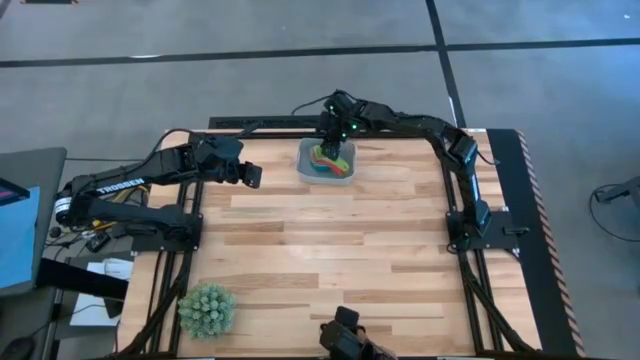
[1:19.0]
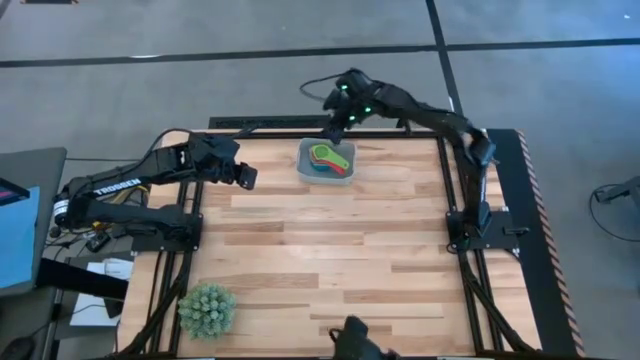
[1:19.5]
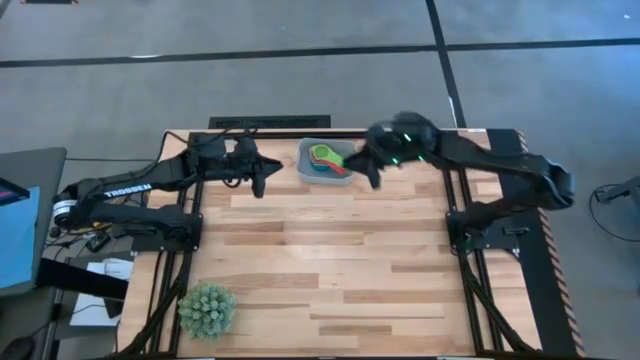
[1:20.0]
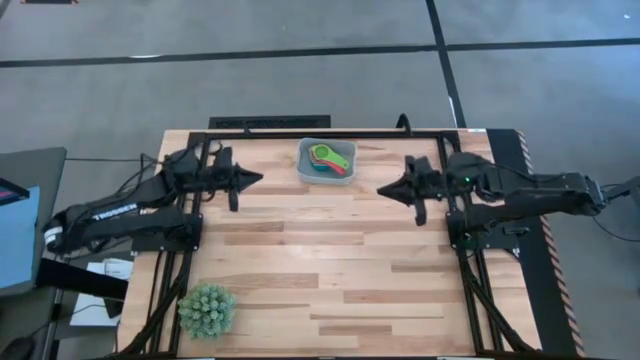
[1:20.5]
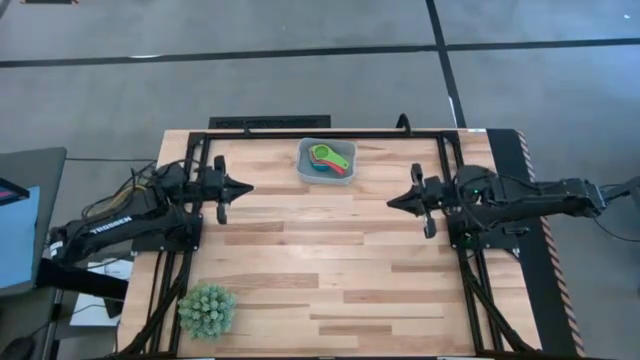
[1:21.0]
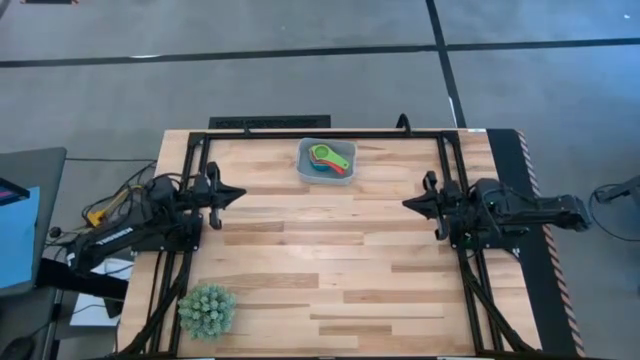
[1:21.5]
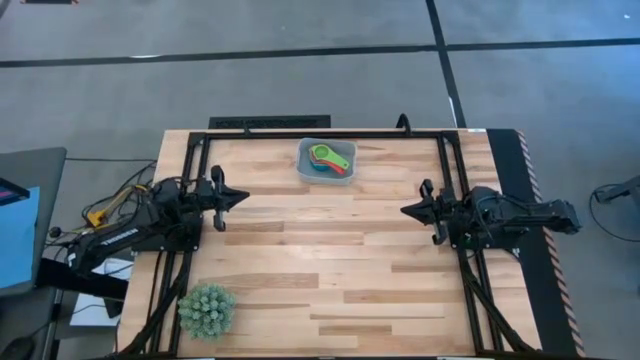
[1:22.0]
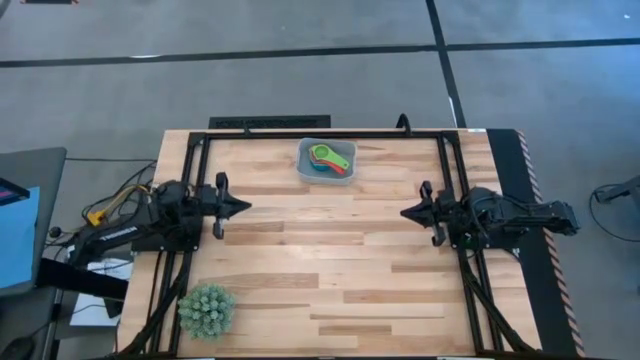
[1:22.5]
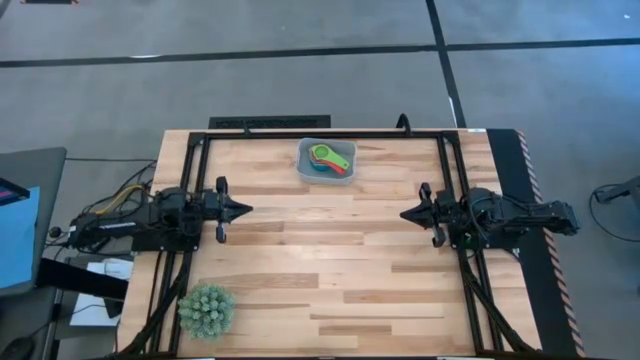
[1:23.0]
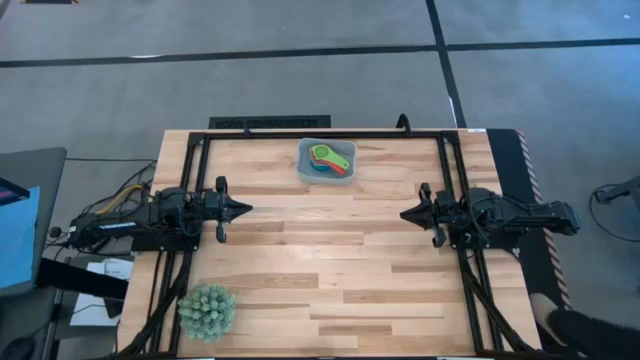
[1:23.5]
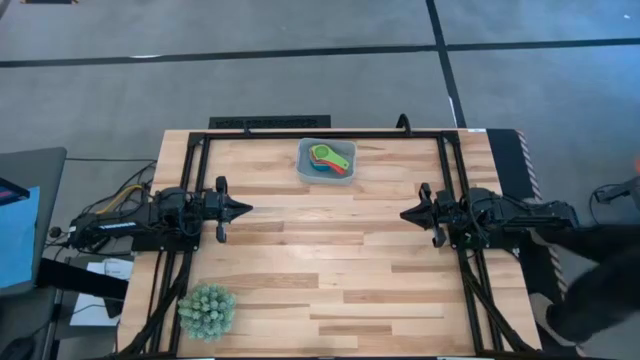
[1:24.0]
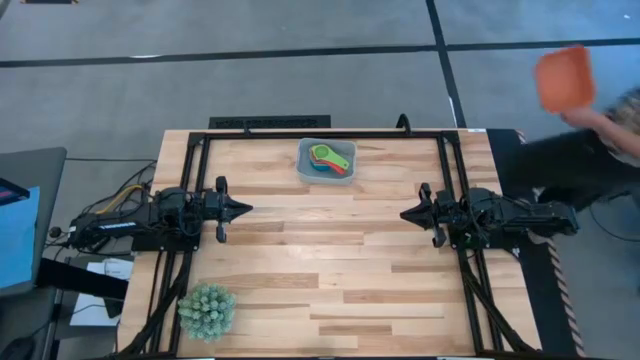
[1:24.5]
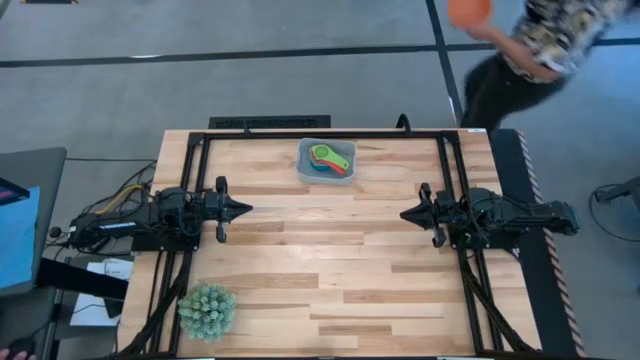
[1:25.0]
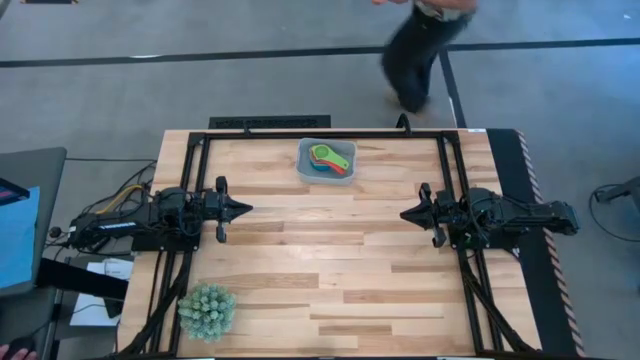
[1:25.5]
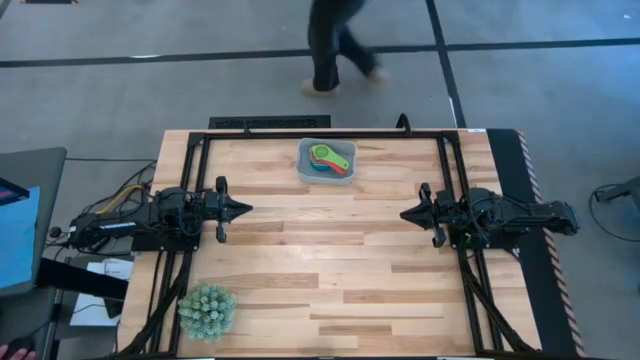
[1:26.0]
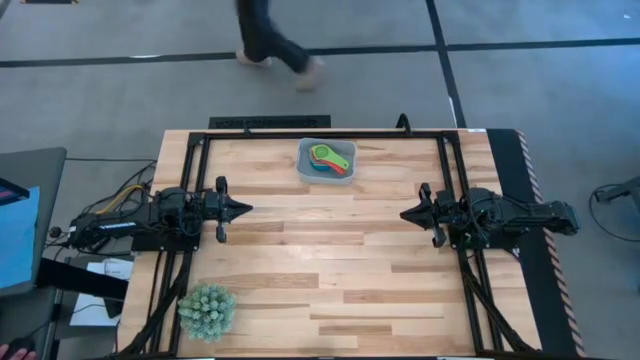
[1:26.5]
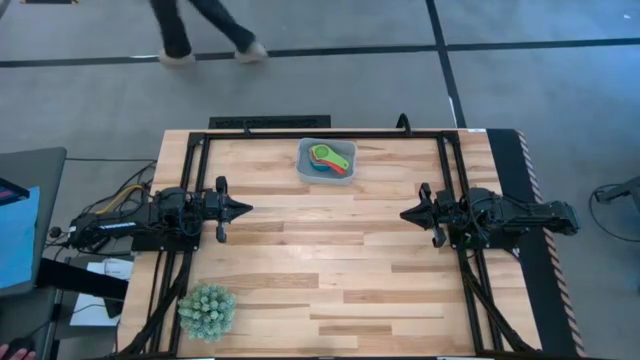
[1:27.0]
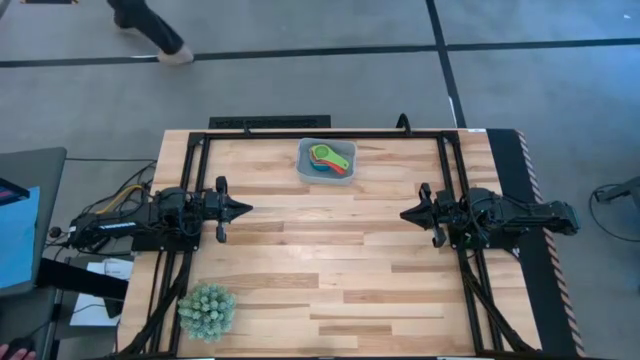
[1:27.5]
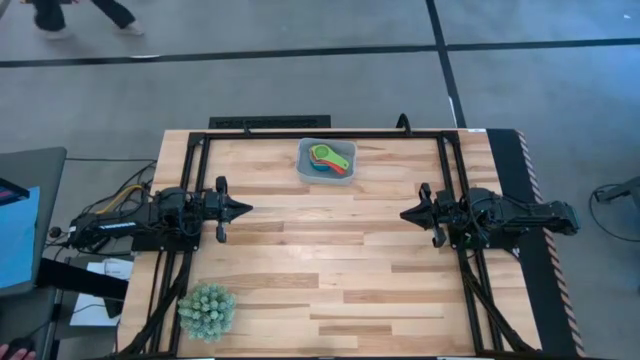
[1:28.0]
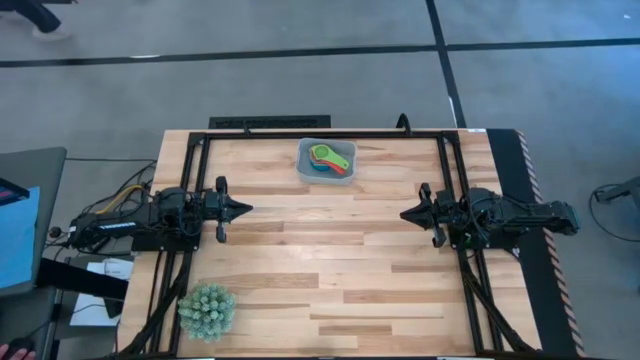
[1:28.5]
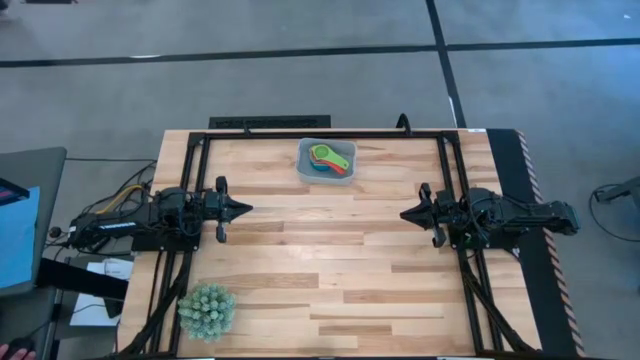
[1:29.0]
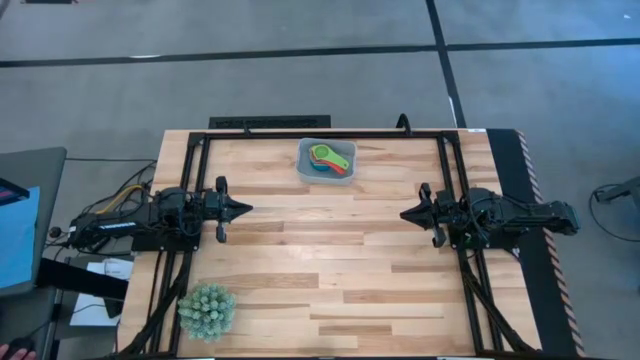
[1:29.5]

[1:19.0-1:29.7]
Task: Nest measuring cups in basket
Return to Home Position

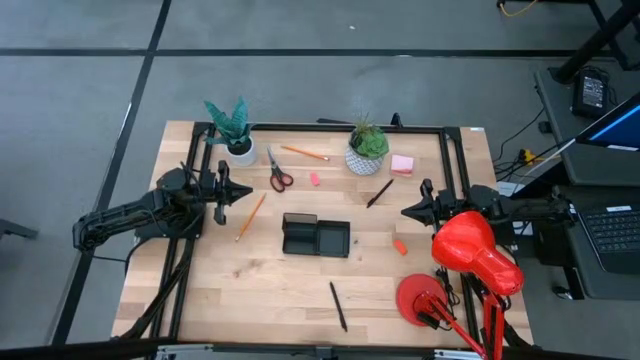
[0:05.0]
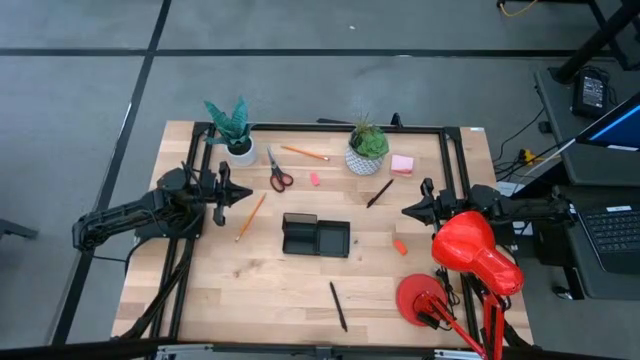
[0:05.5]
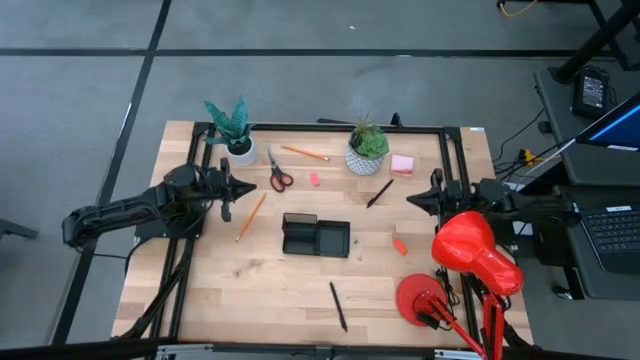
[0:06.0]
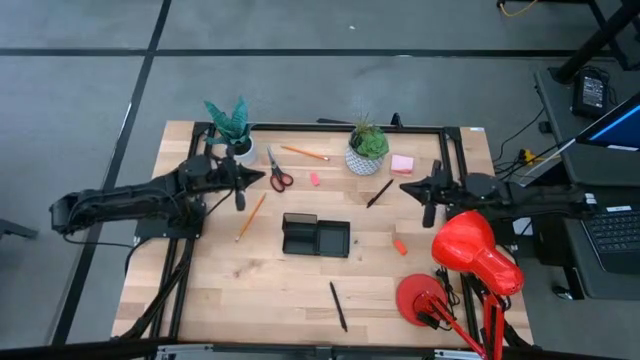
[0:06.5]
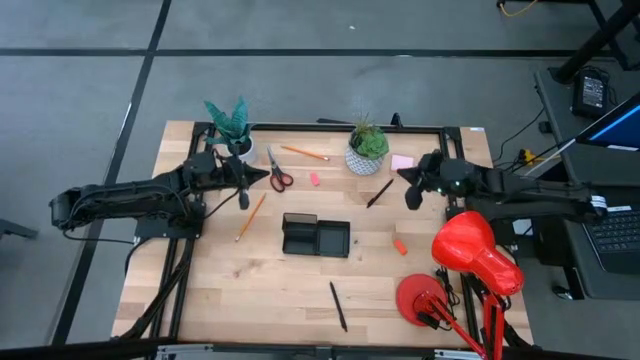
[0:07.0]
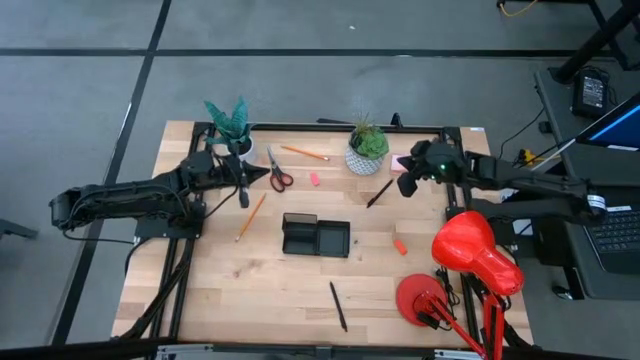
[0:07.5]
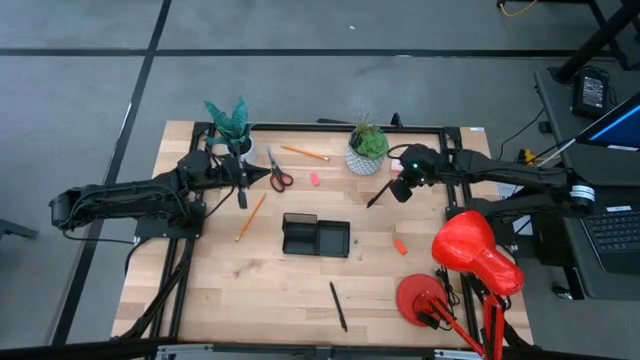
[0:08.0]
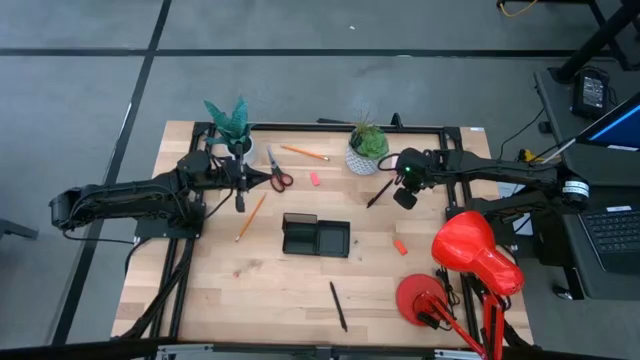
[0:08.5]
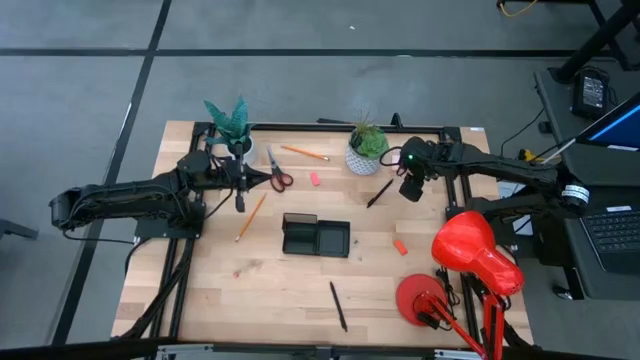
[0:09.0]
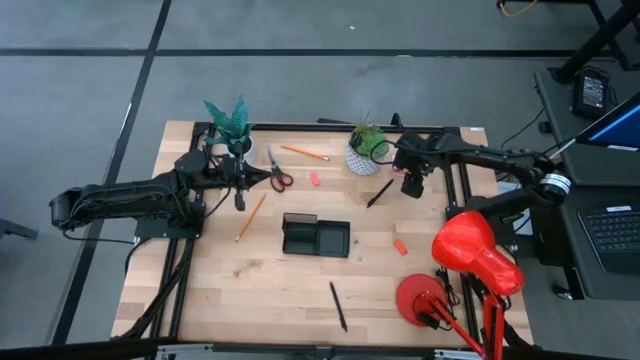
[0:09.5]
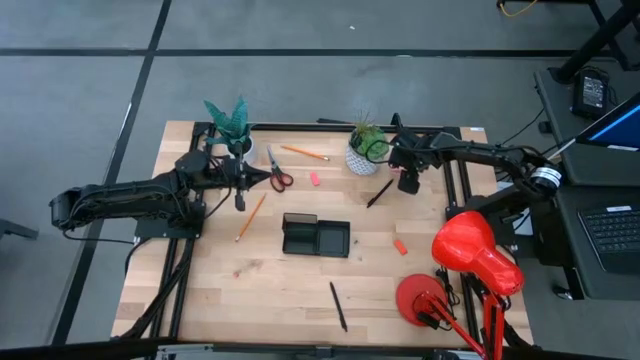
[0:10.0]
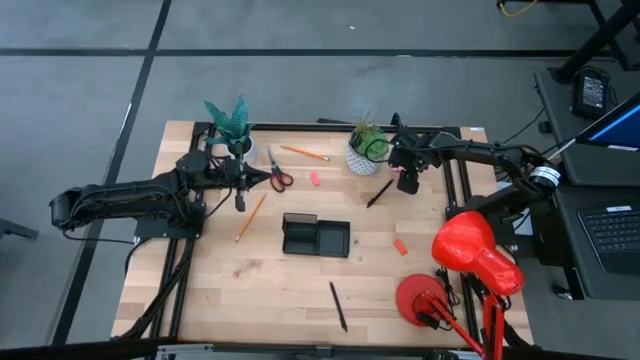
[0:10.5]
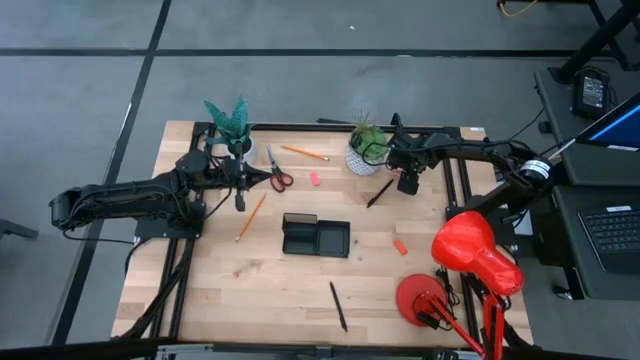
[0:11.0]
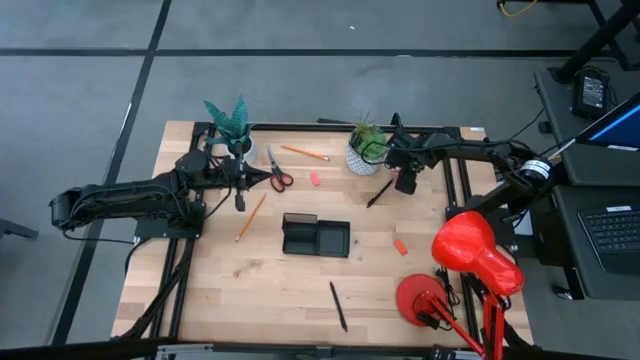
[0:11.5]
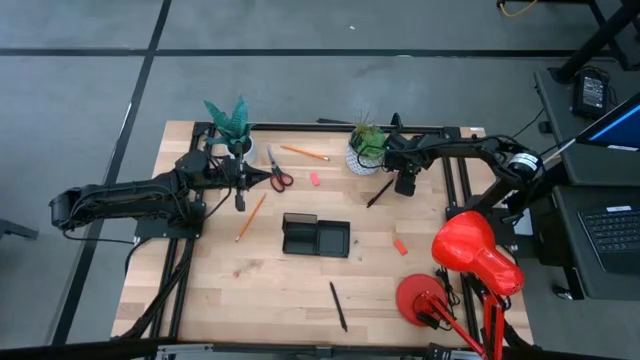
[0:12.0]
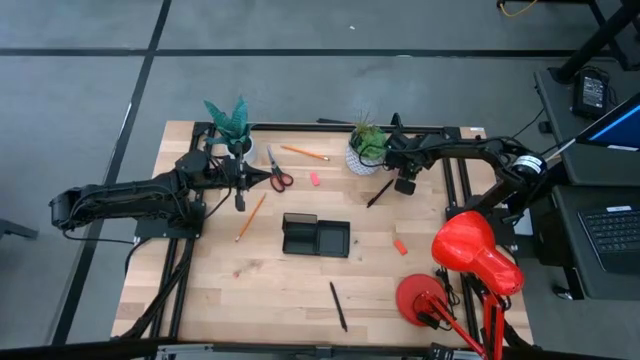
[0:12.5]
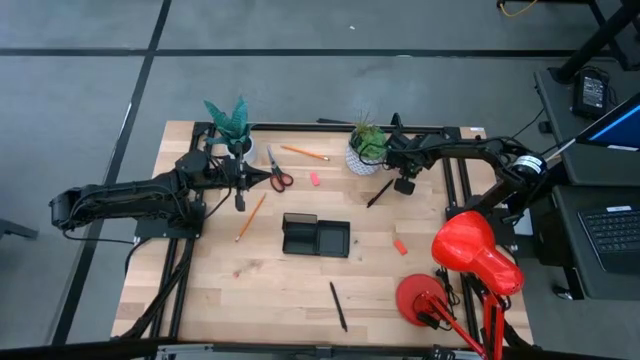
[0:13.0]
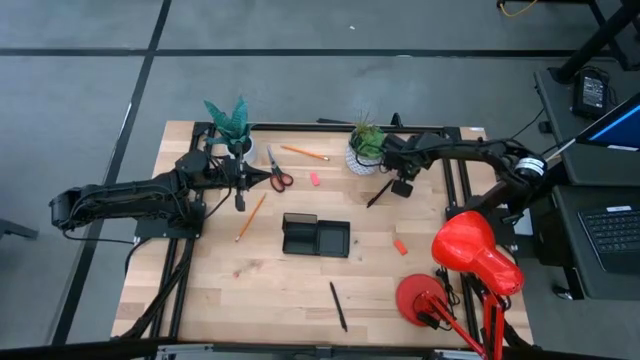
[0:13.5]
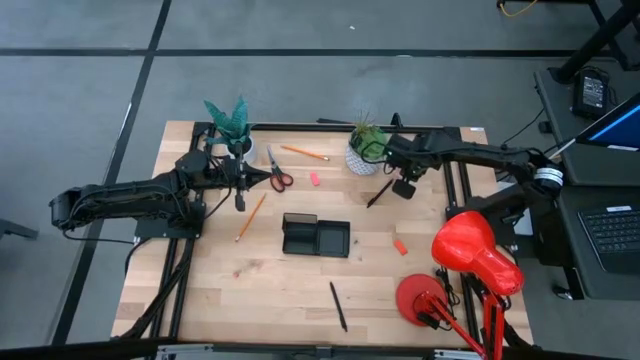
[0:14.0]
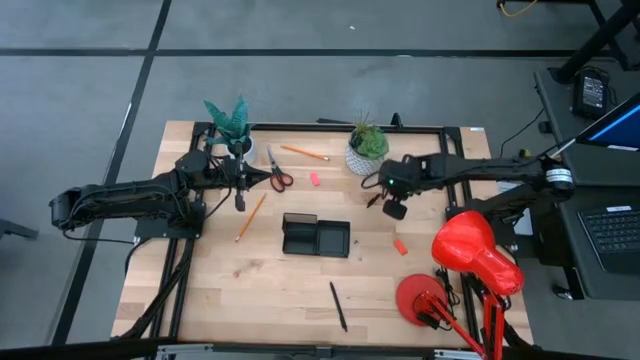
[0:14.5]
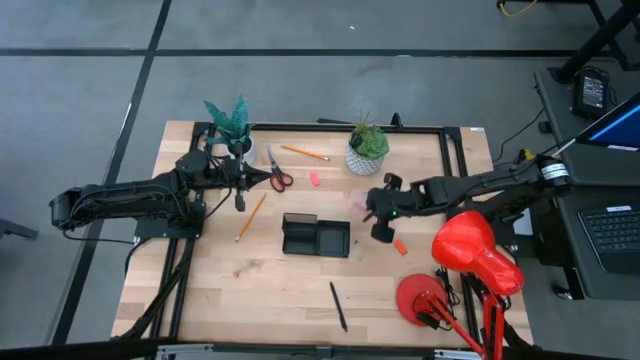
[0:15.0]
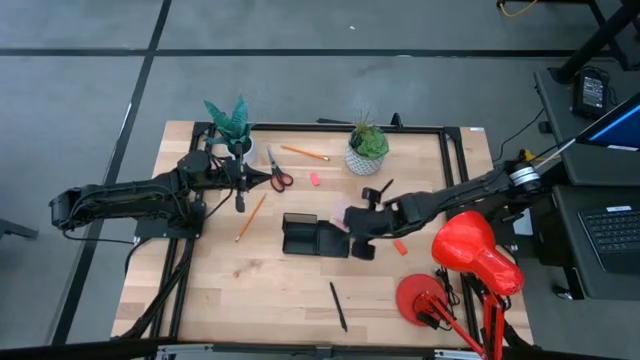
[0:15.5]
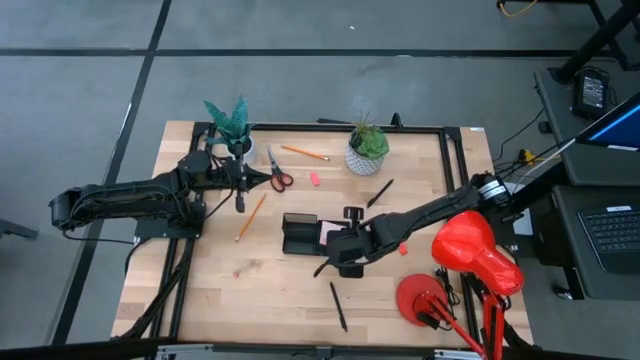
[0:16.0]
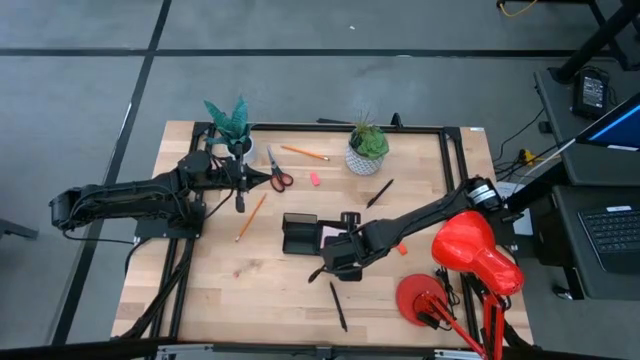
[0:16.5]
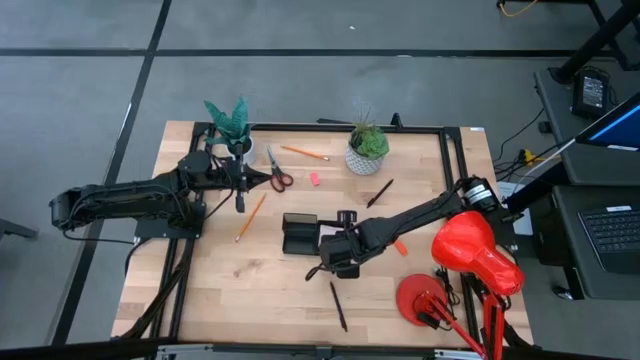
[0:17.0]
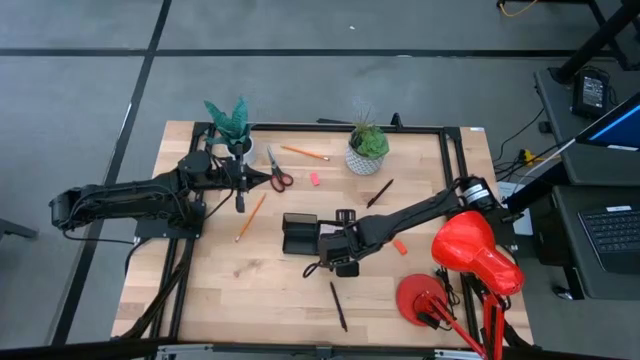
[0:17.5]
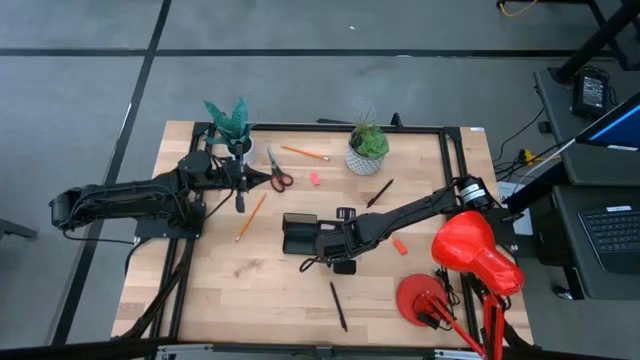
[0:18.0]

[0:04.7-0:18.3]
Task: Pick and place office supplies into organizer
Put the pink sticky note into the desk organizer
